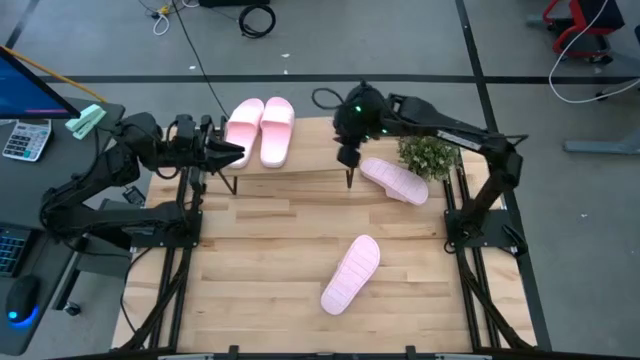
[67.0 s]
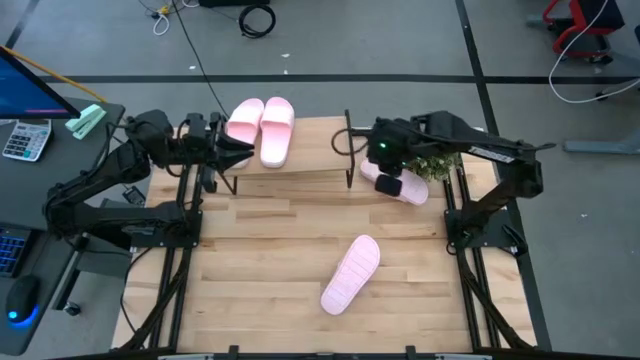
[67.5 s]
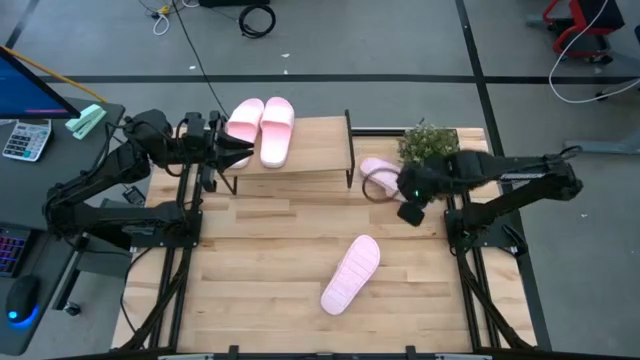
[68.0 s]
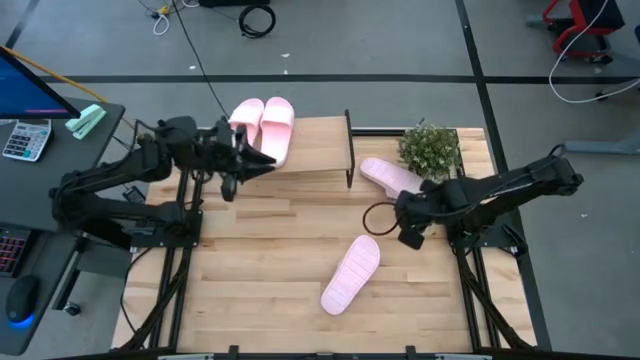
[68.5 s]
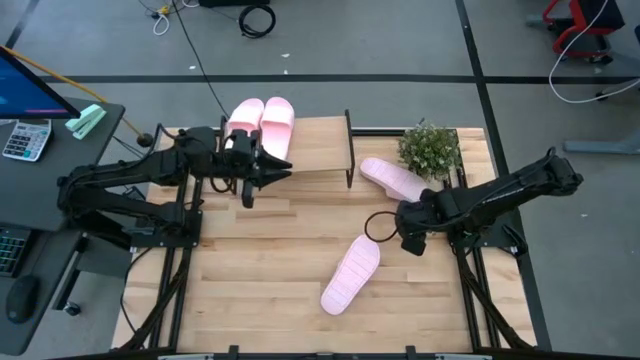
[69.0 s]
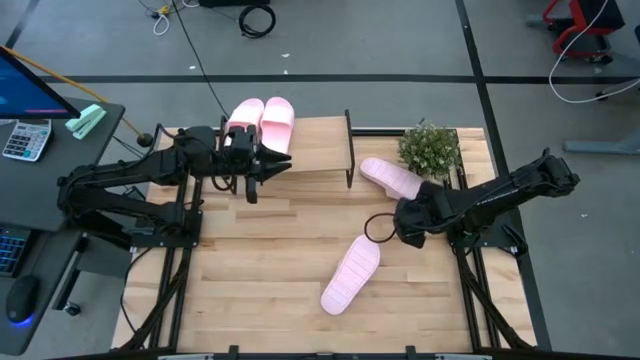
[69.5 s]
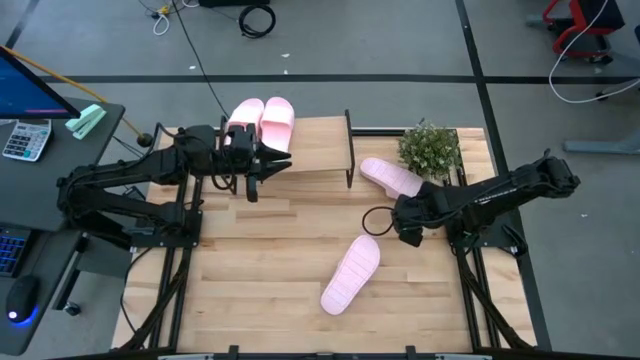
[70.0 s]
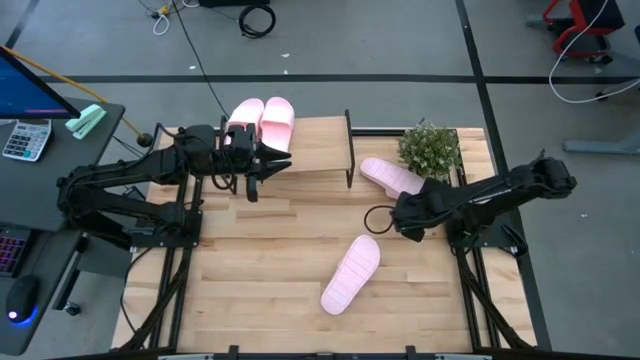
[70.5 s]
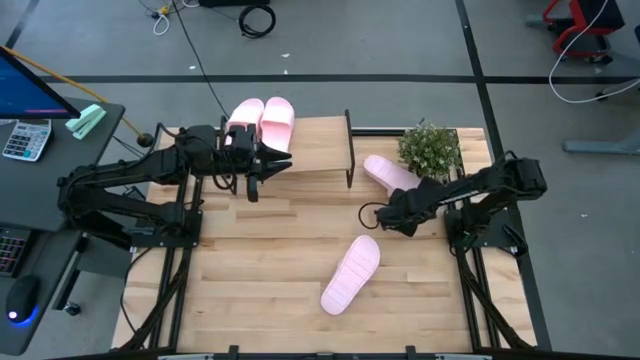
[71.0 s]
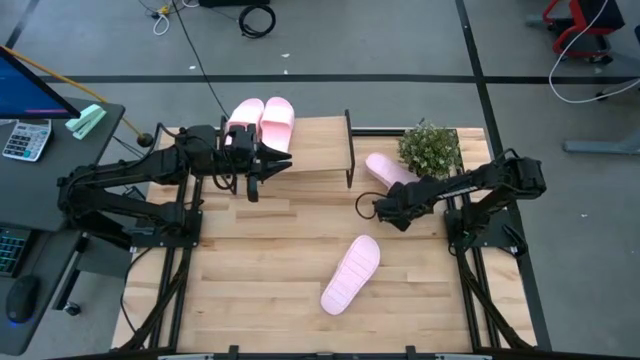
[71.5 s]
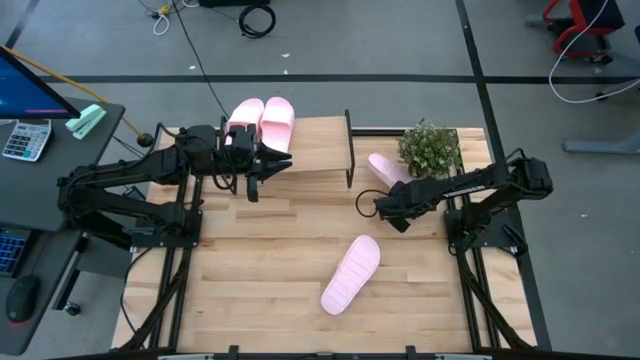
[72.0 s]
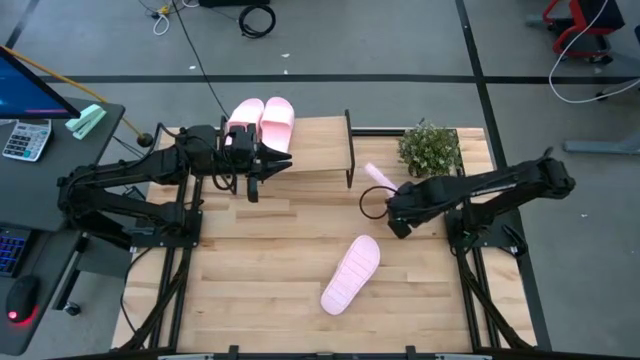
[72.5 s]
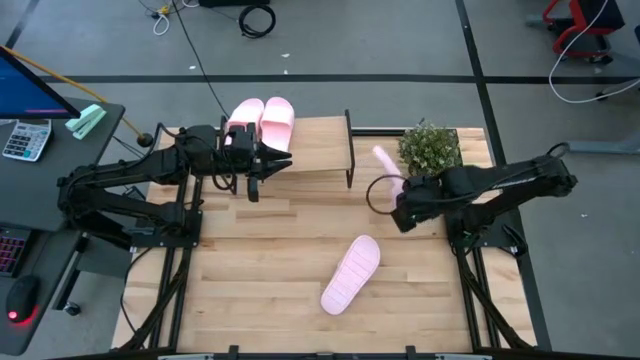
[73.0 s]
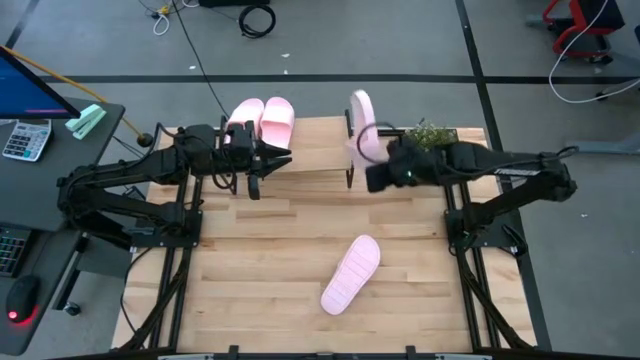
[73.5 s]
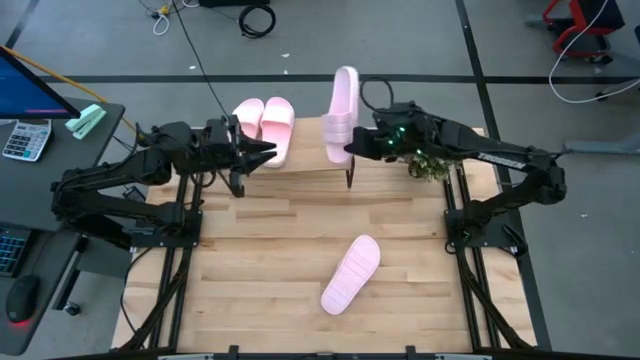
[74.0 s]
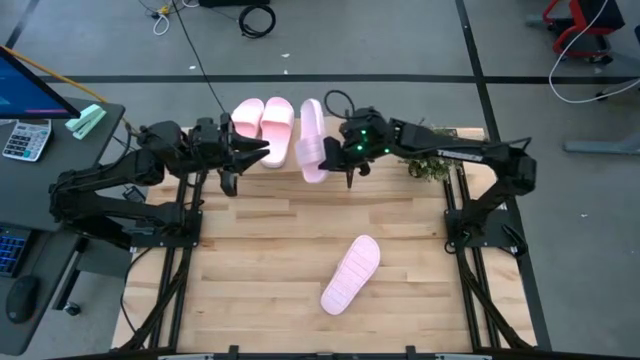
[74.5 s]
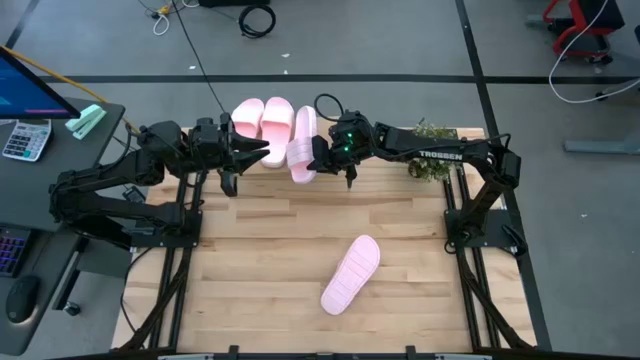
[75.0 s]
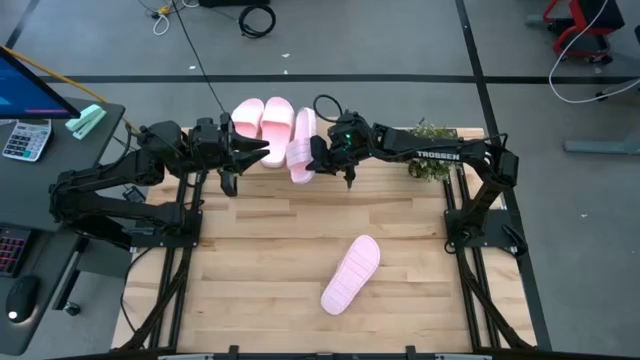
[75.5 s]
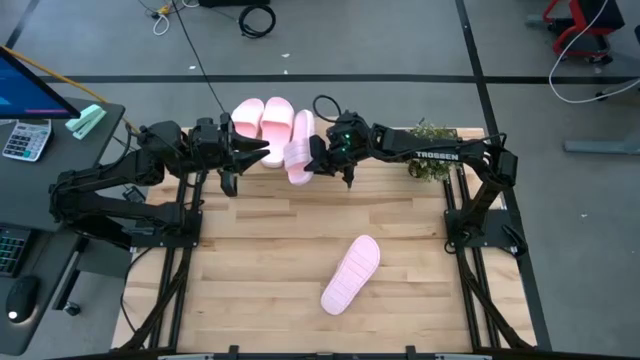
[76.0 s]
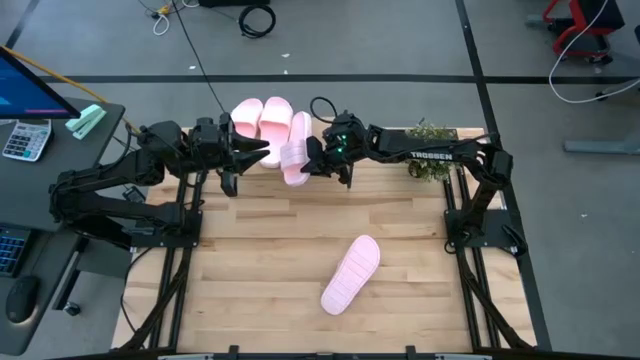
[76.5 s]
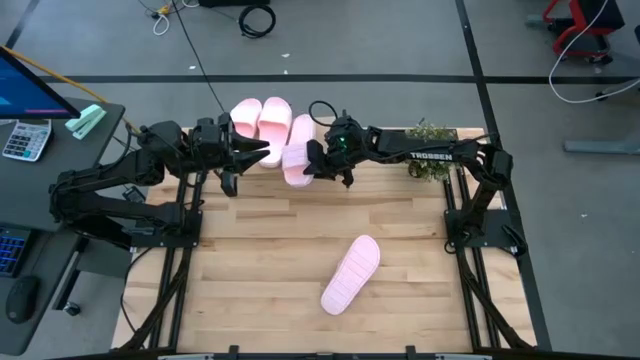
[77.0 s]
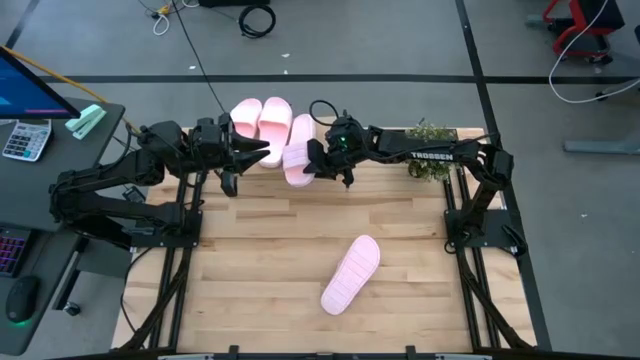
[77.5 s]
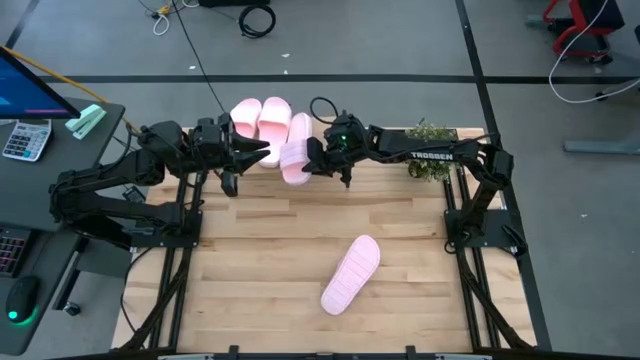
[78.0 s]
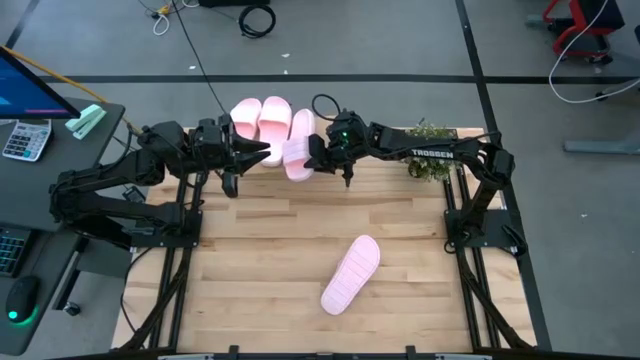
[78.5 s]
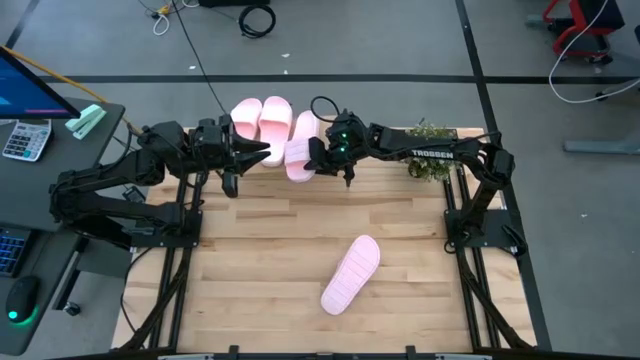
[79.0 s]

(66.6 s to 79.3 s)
Task: Pick and place slides into the shelf
Put the pink slides on the shelf

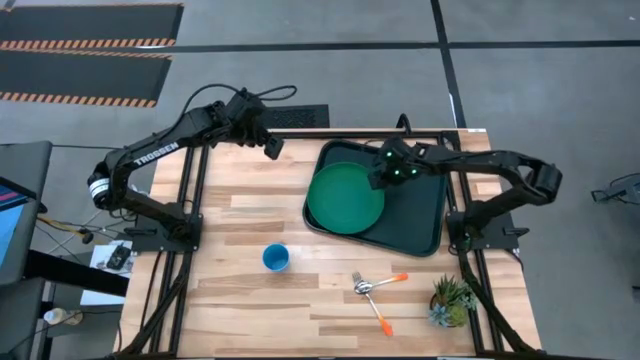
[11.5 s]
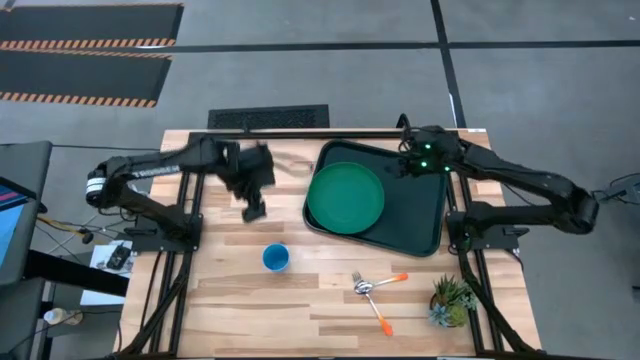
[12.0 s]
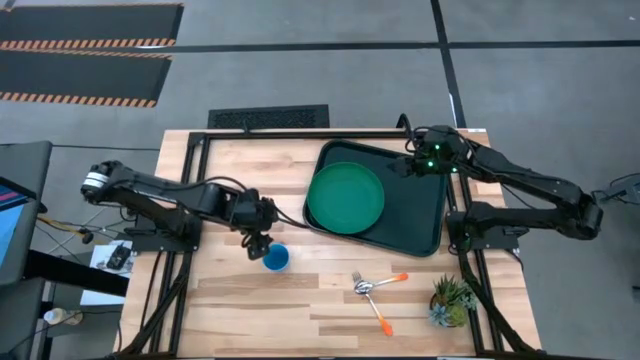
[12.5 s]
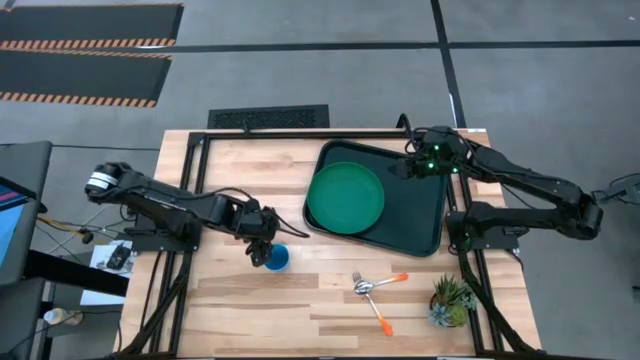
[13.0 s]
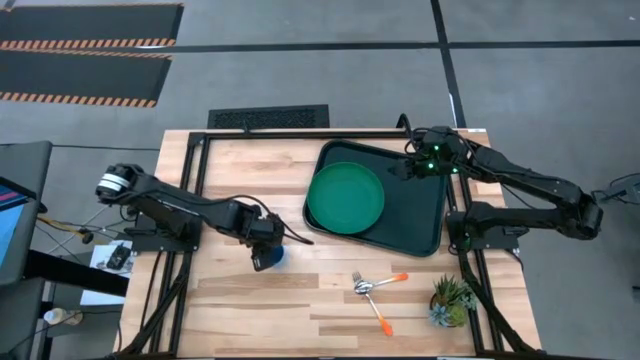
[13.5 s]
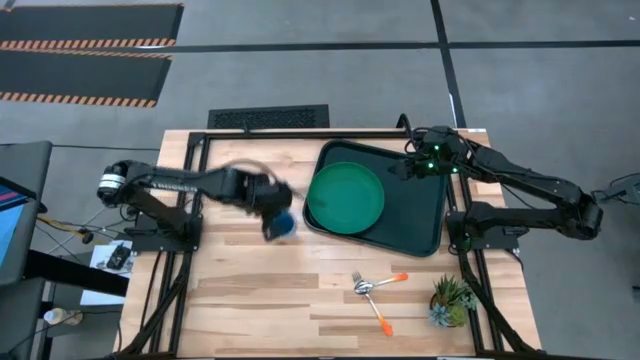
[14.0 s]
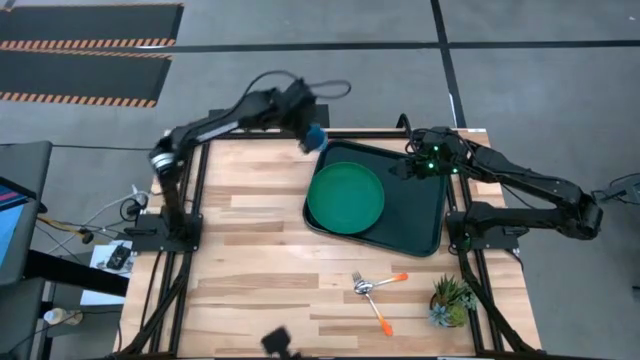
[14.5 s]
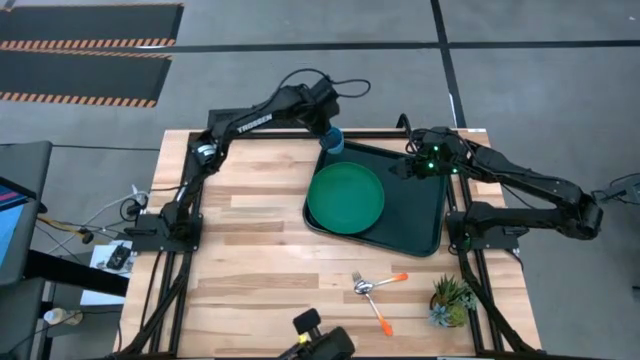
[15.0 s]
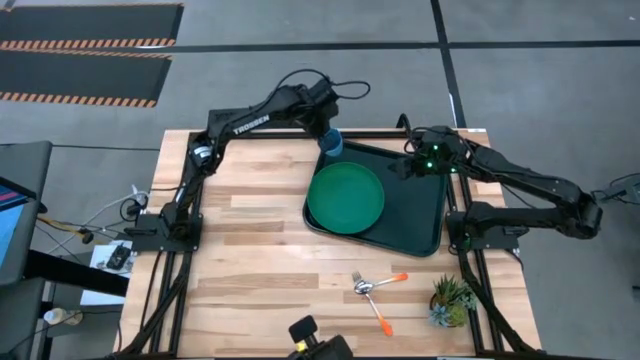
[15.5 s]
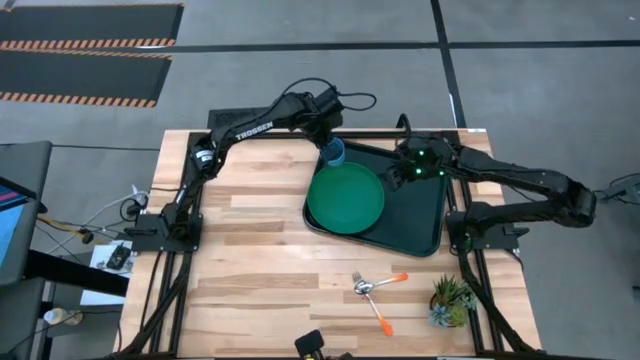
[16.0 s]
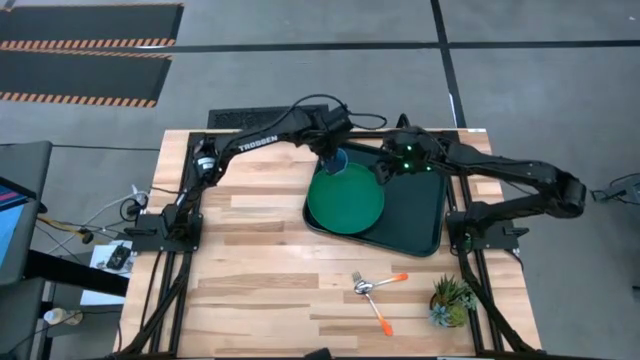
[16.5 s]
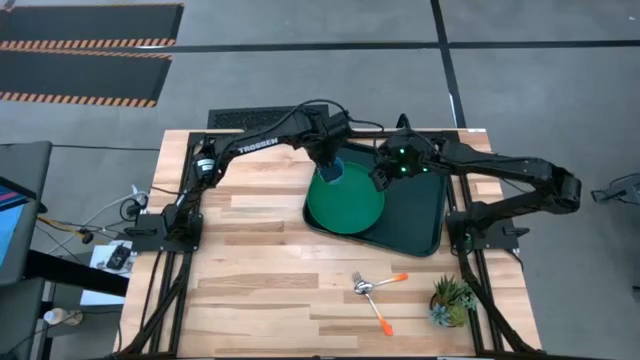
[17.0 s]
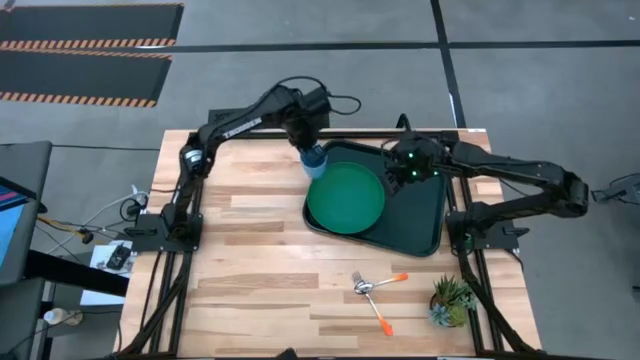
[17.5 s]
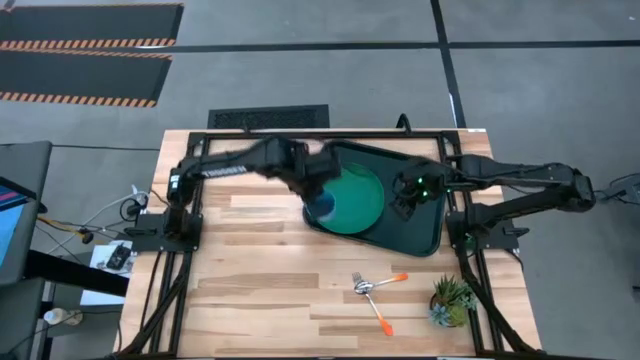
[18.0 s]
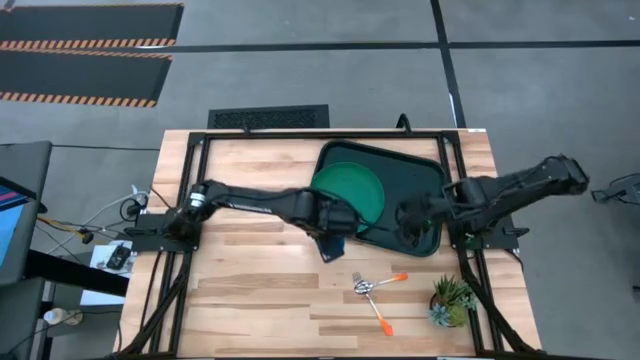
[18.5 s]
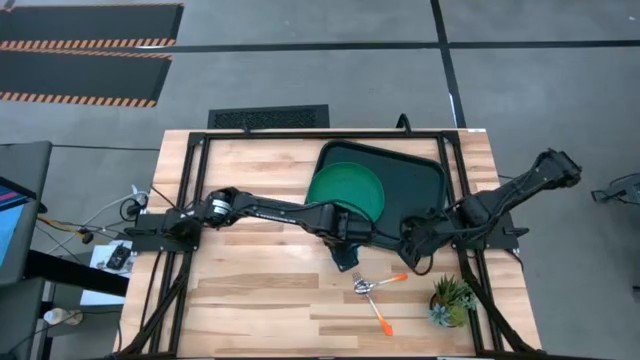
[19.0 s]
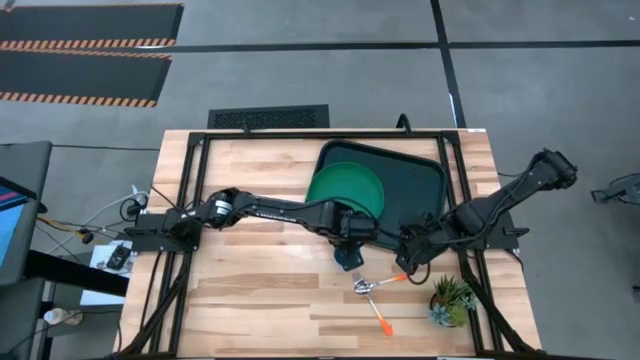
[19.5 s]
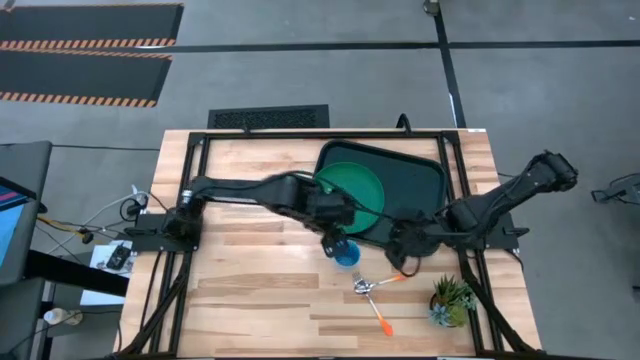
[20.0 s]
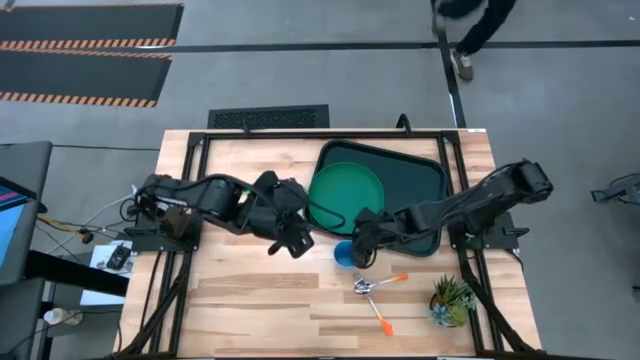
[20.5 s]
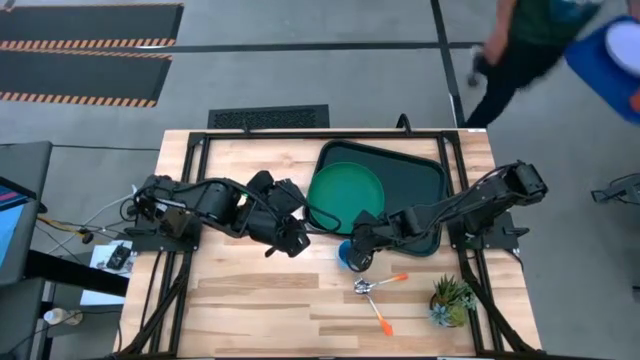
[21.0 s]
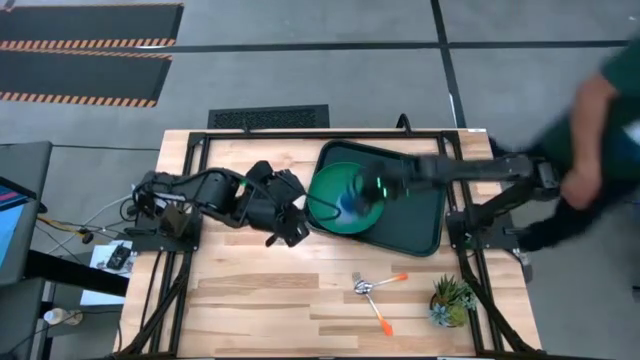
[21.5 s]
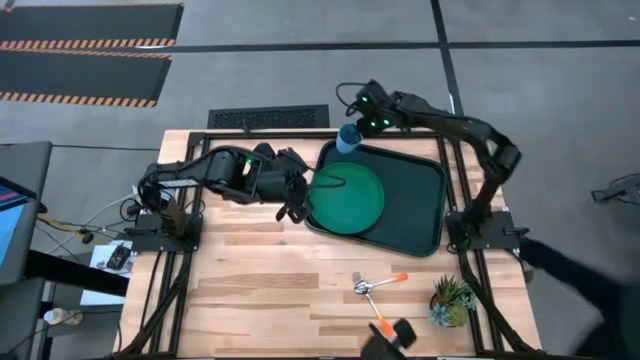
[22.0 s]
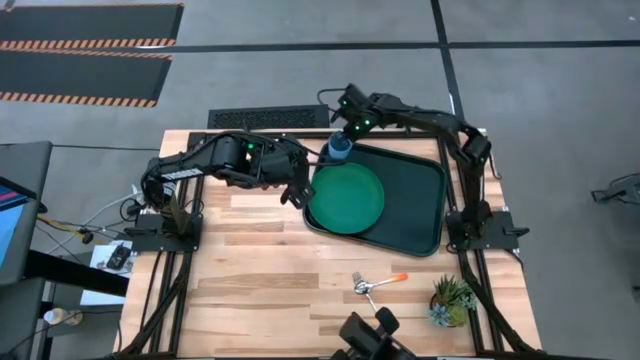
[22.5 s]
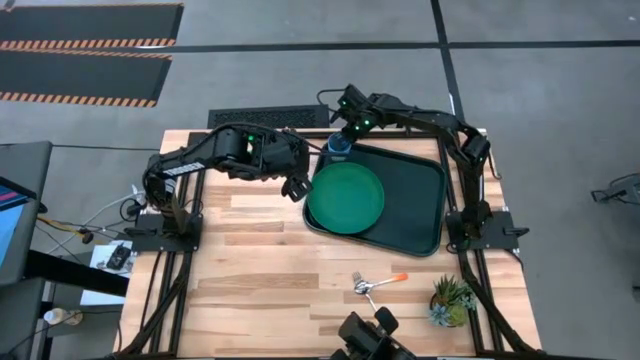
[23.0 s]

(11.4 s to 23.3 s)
Task: Pick and place plate/cup/fork/spoon on tray
Put the blue cup on the black tray to the top left of the green plate
